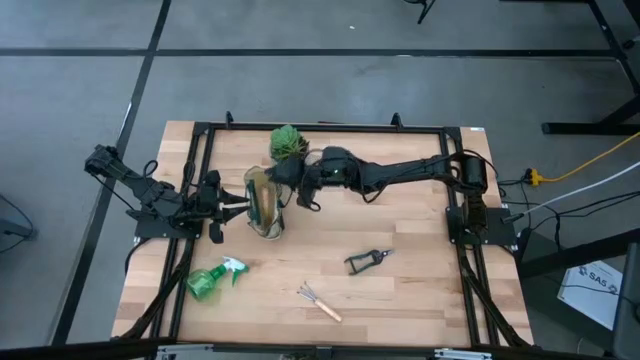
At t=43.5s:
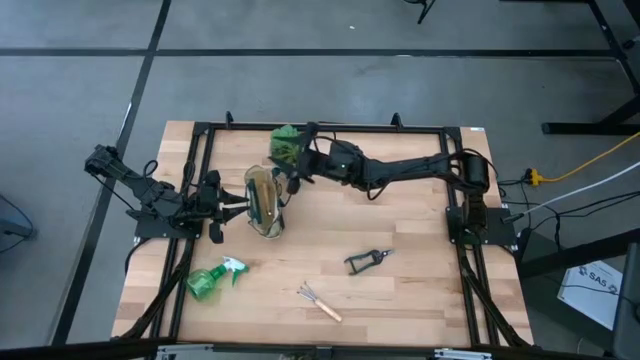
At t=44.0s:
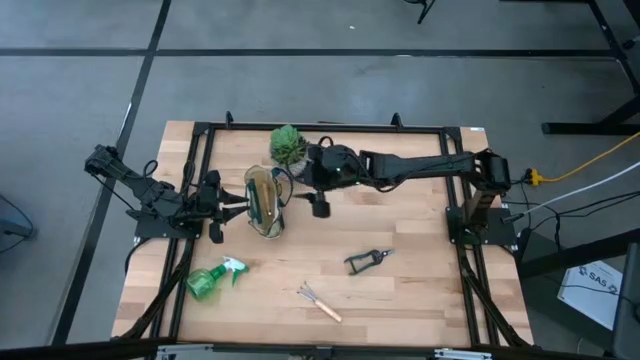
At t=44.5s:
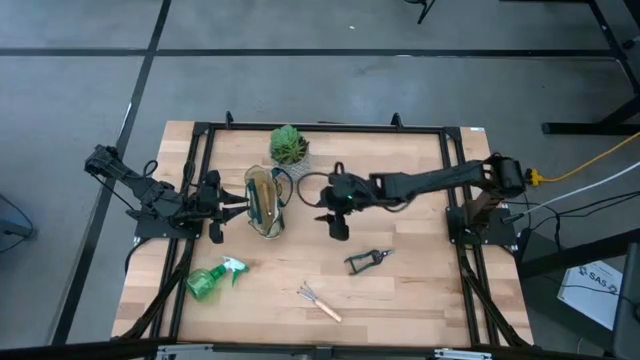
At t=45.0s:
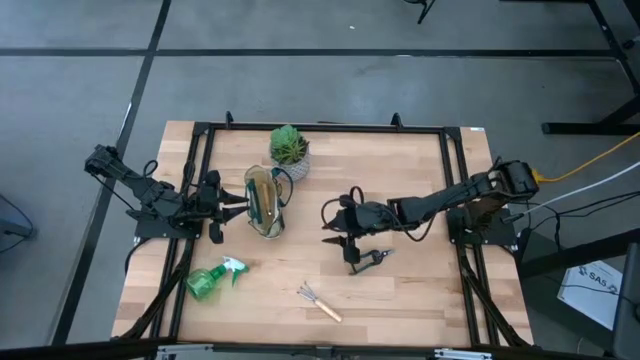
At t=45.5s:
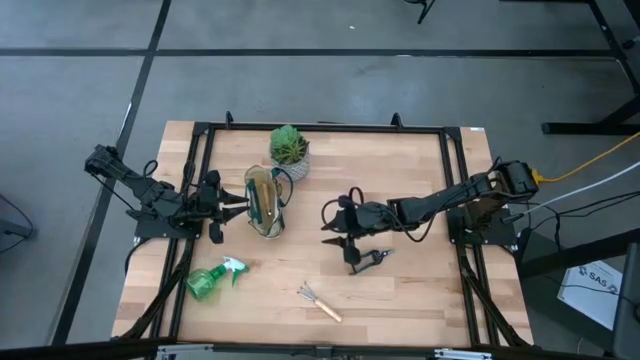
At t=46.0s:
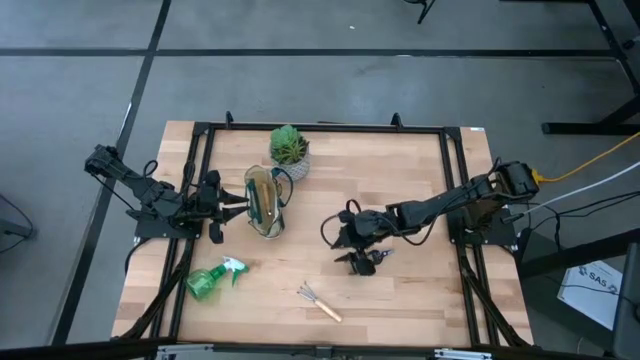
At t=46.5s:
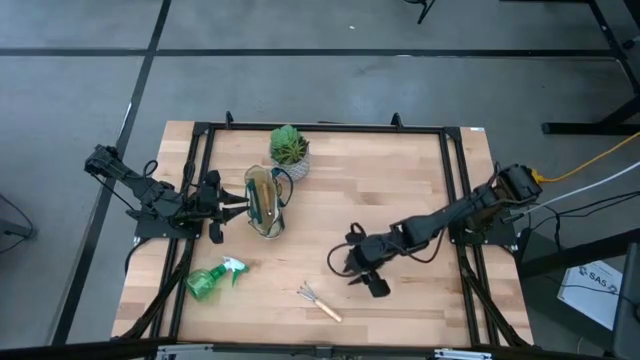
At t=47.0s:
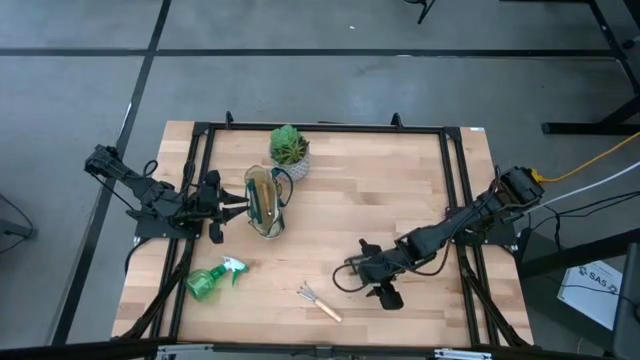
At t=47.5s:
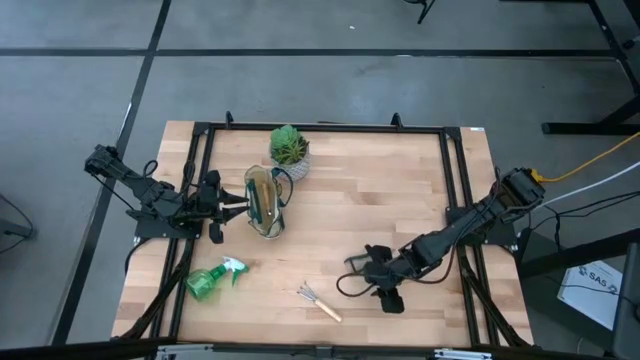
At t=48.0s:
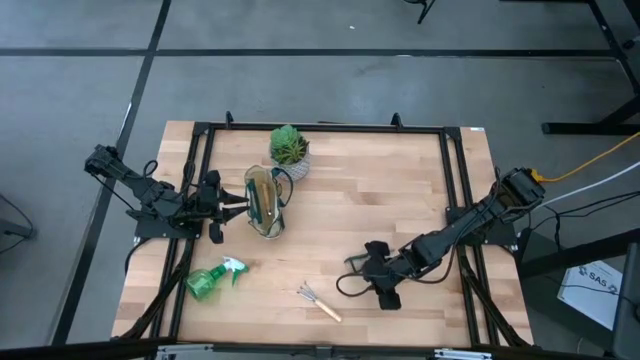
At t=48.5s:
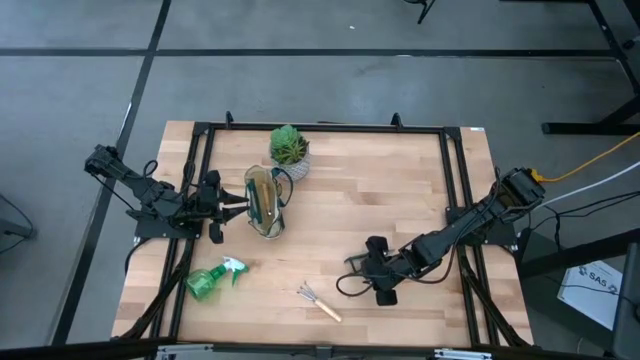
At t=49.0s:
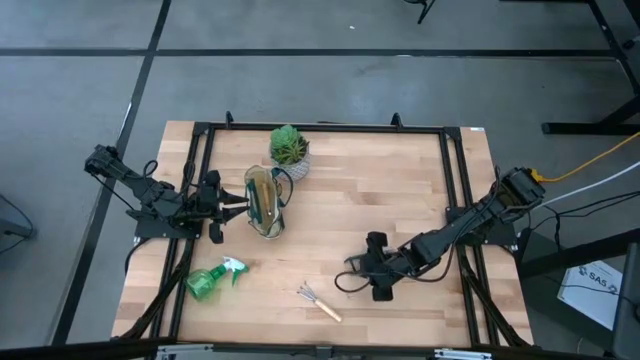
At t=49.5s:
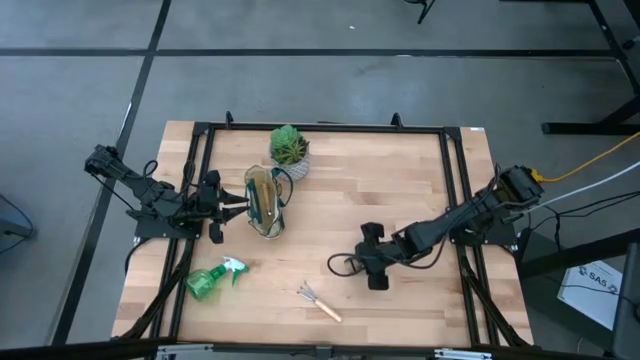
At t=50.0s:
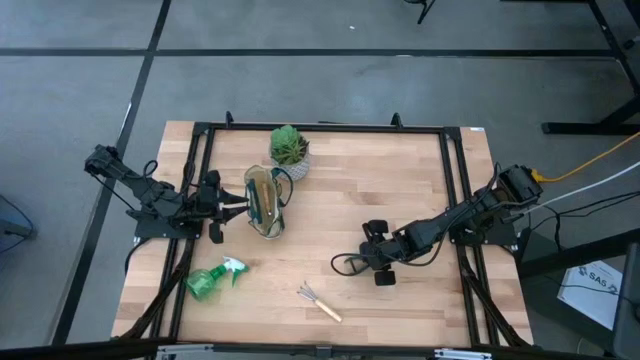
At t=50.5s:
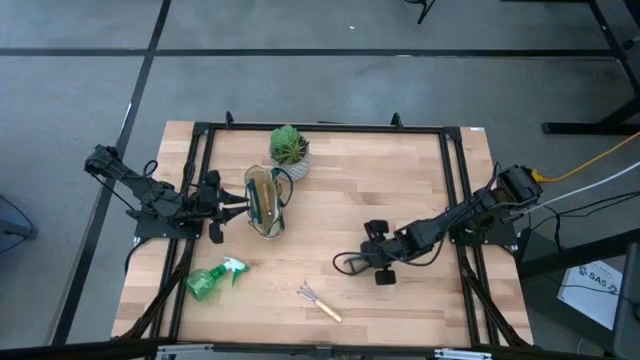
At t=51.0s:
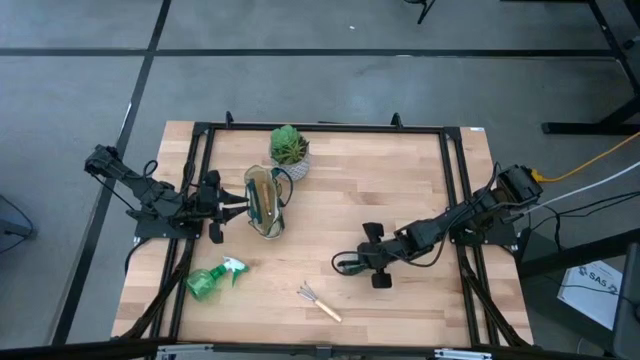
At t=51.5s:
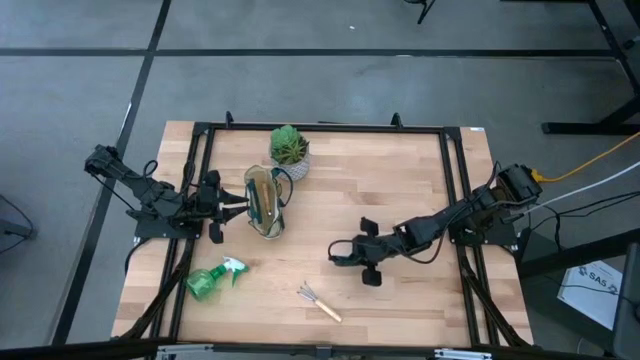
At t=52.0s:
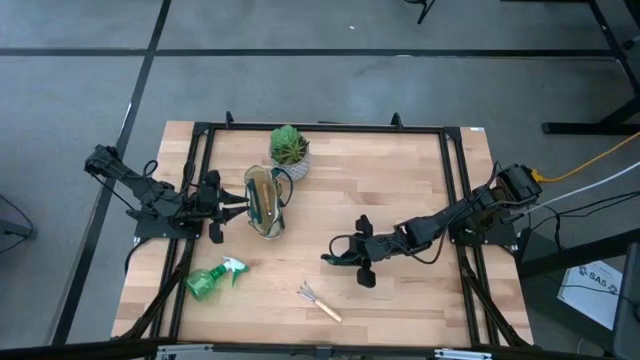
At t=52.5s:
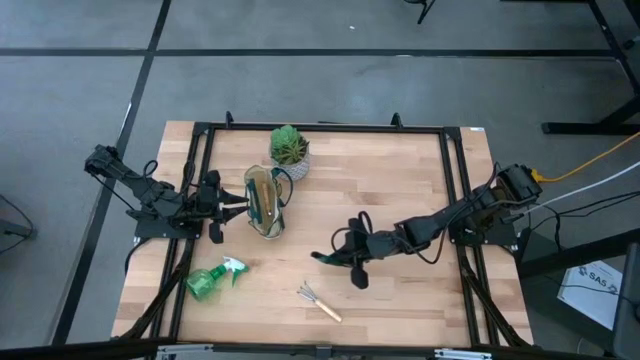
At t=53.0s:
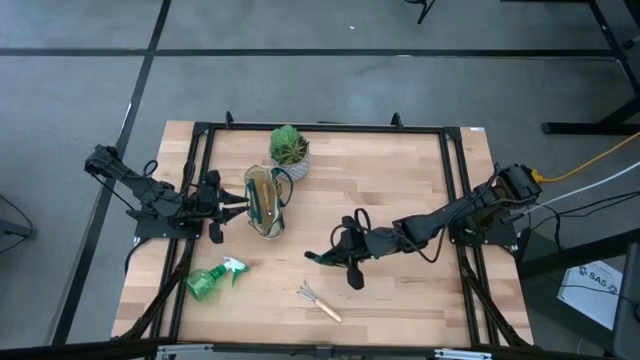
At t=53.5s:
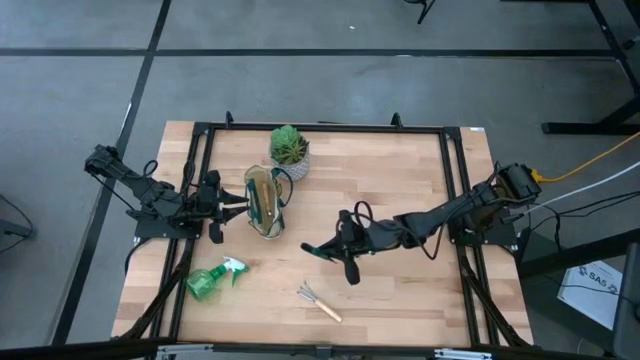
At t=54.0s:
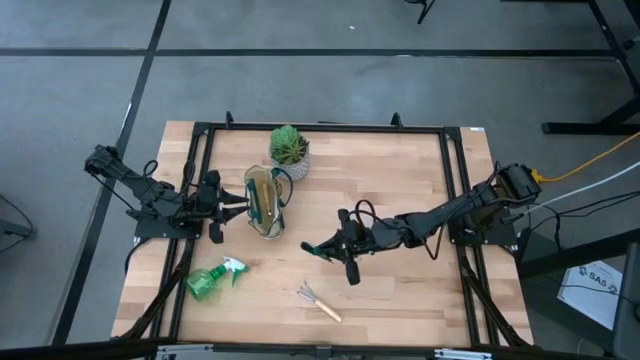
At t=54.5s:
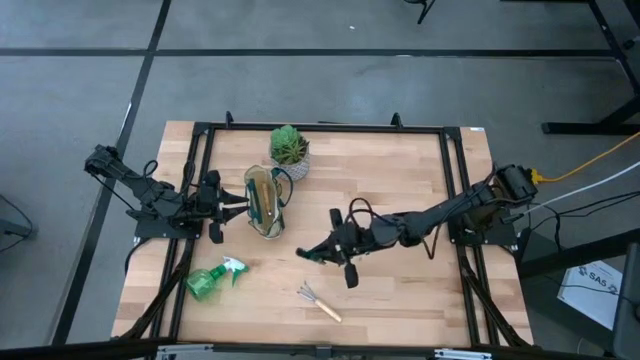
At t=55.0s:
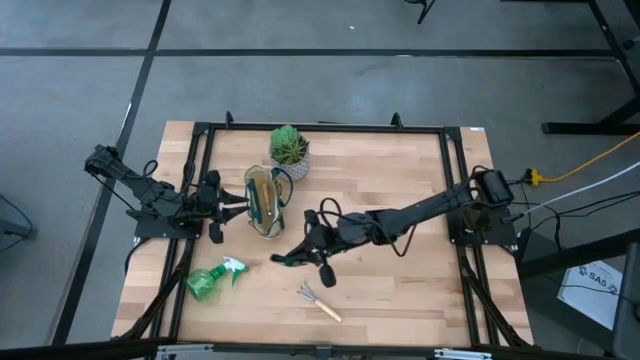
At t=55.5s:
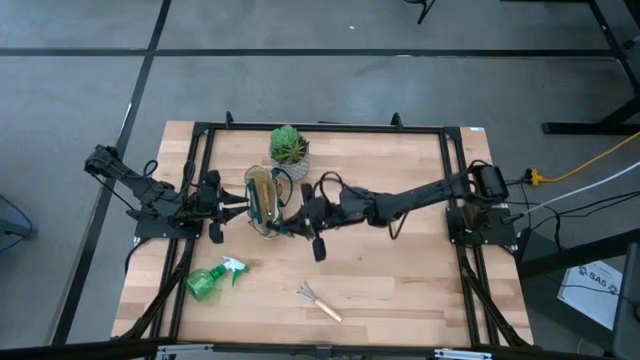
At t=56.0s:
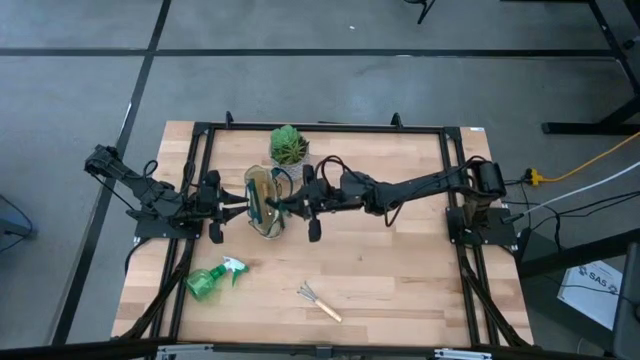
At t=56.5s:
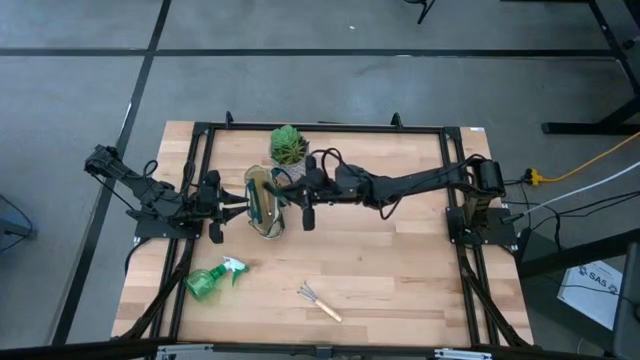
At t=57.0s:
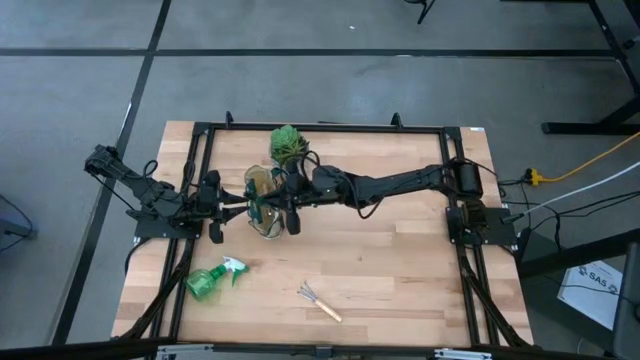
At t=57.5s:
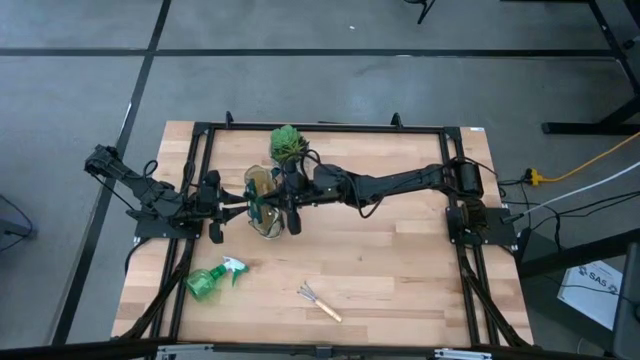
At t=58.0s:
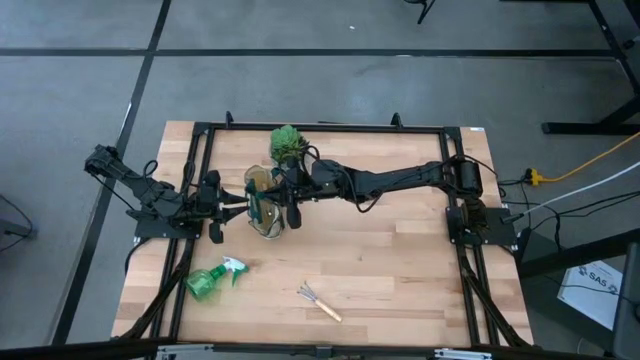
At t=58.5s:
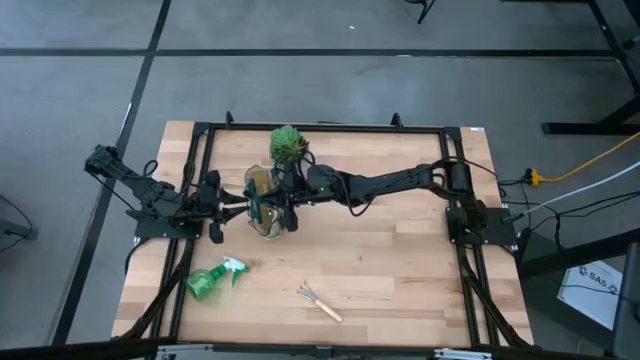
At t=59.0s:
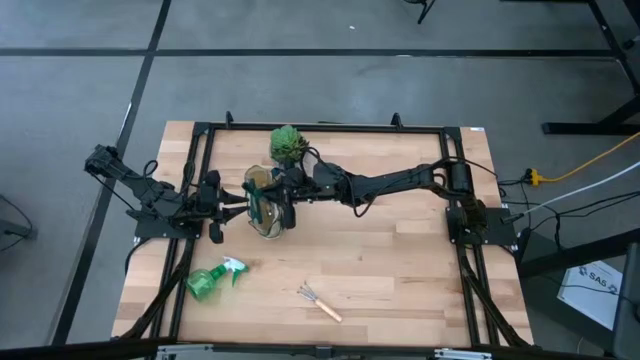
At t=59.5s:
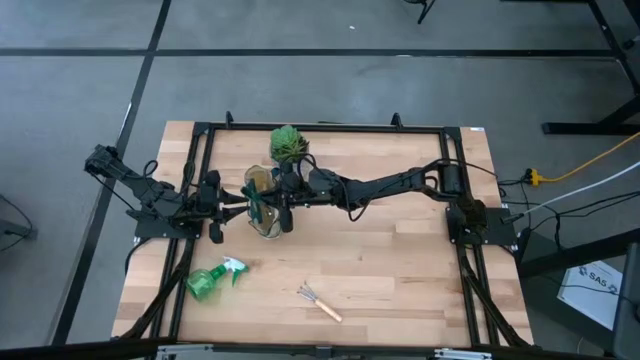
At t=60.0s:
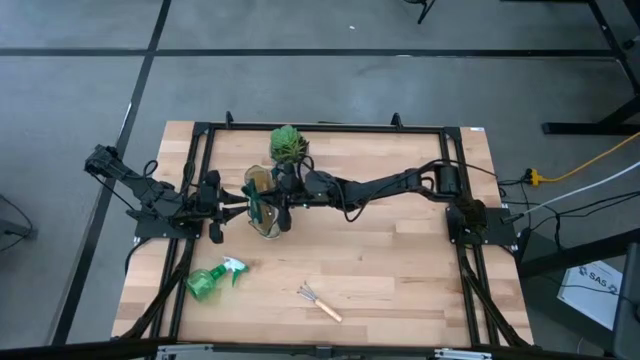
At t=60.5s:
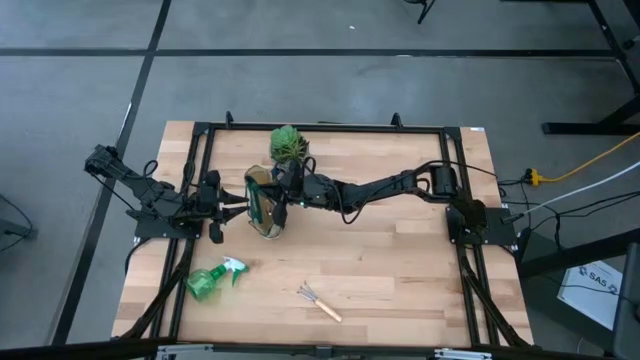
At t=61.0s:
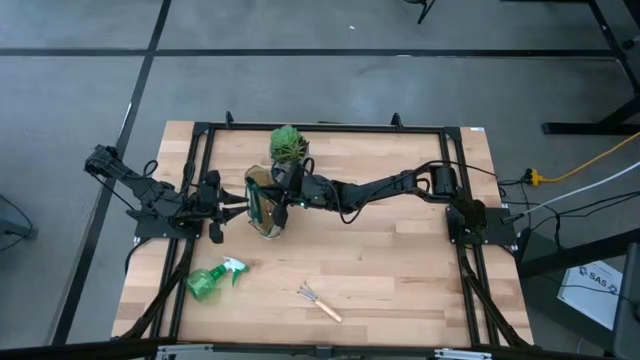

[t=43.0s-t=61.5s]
Task: Pick & Place Garden tools in Gardening bag
Put the shear scissors into the gardening bag

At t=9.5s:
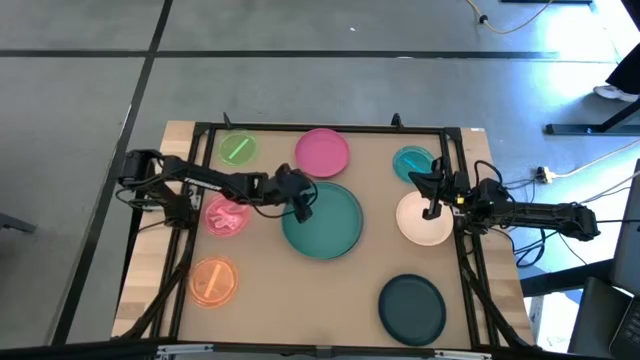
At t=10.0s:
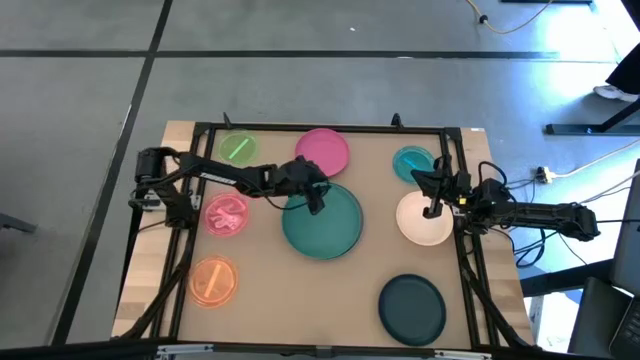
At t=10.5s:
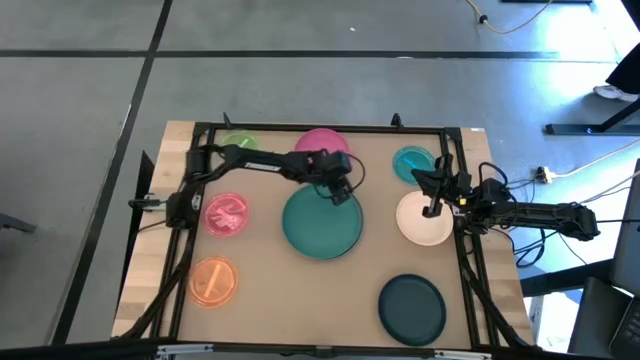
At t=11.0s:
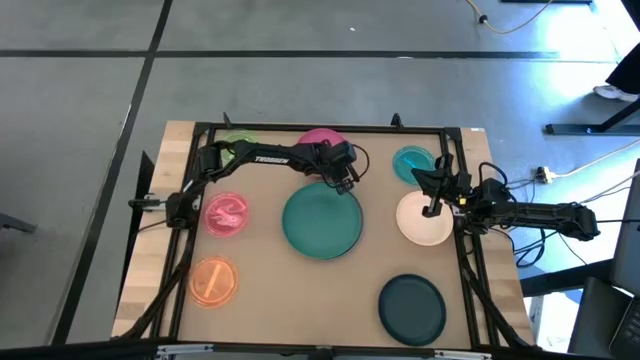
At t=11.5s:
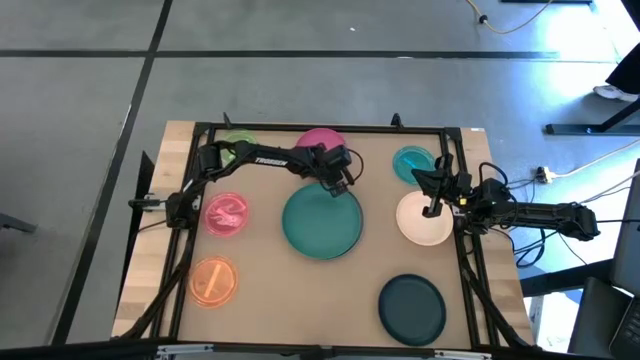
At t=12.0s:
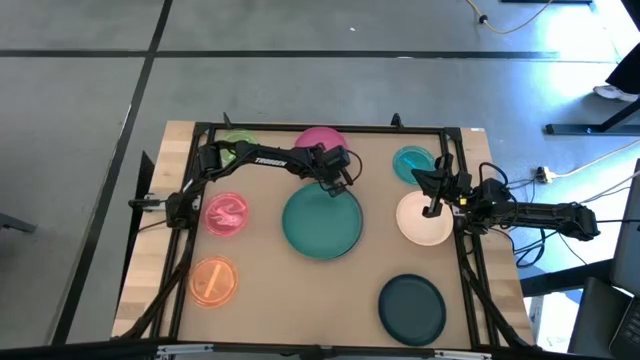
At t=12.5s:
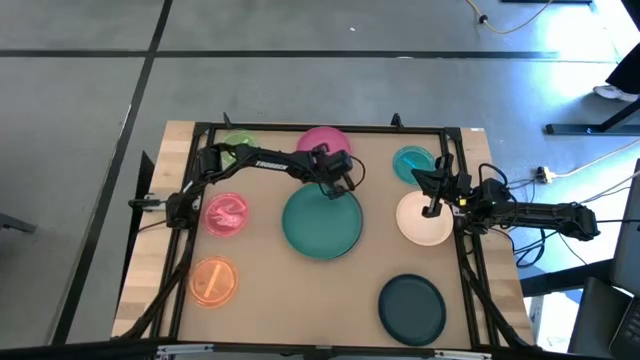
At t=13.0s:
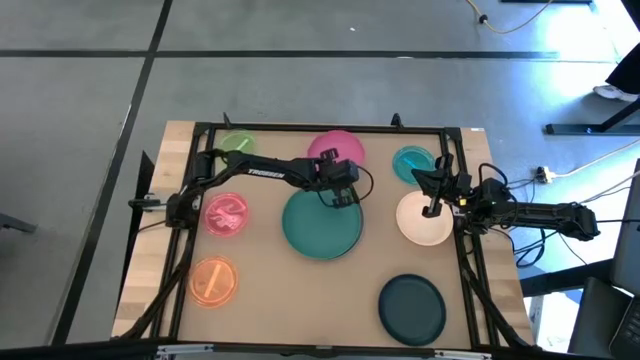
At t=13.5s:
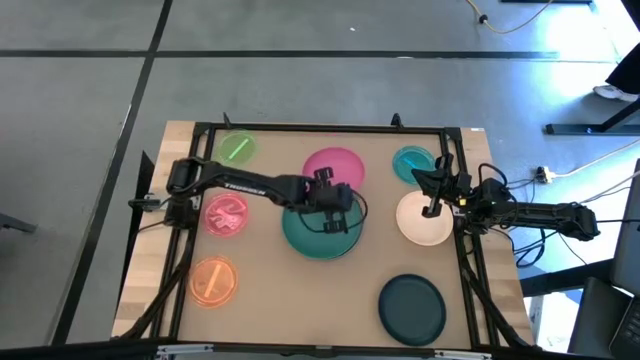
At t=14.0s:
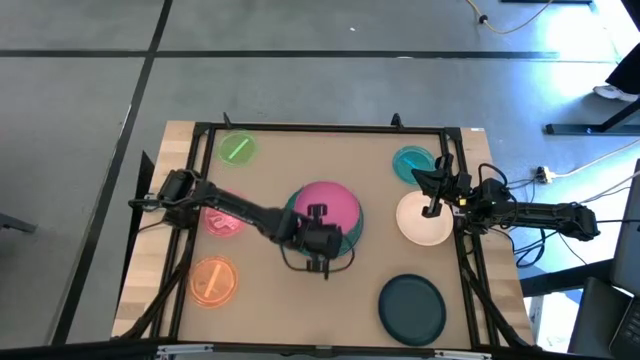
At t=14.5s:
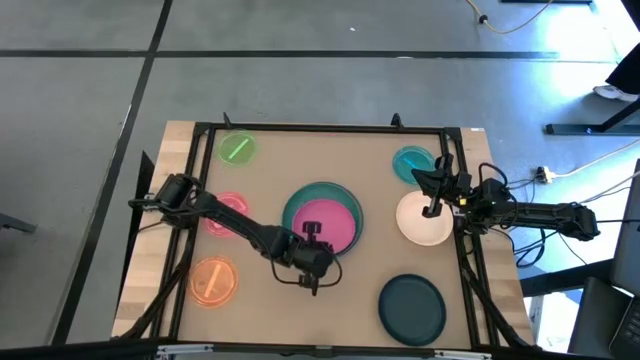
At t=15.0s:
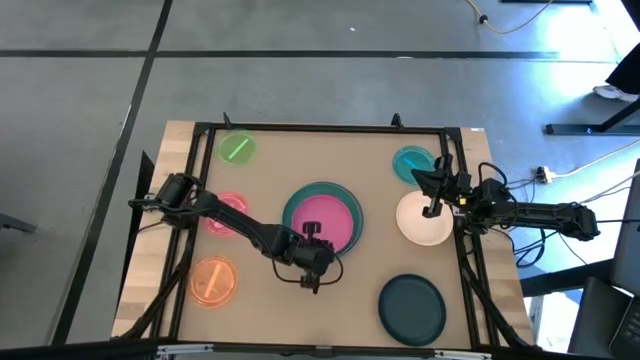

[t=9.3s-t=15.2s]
Task: Stack plastic plates
Stack the pink plate on top of the blue plate
